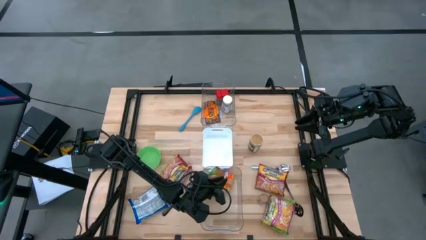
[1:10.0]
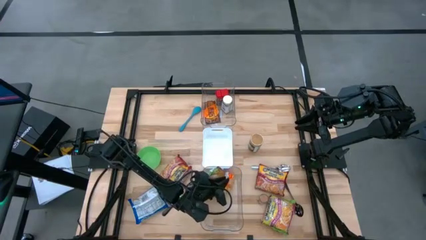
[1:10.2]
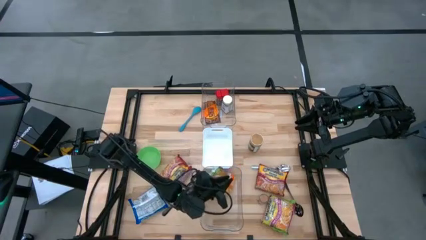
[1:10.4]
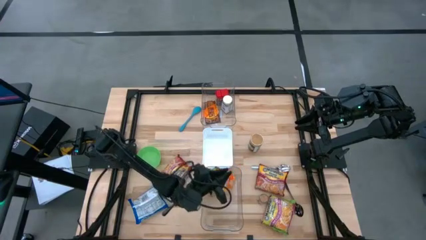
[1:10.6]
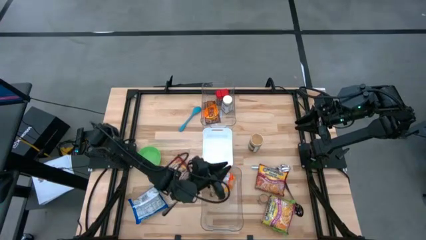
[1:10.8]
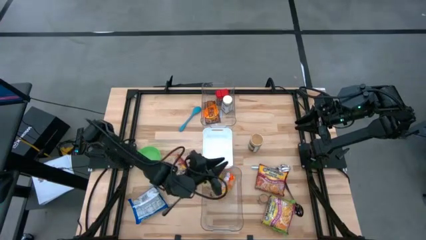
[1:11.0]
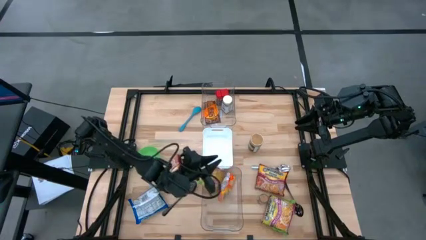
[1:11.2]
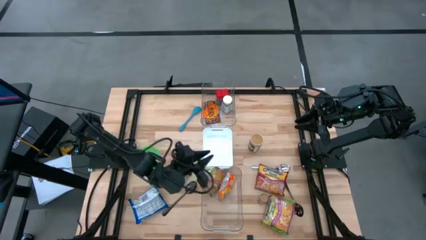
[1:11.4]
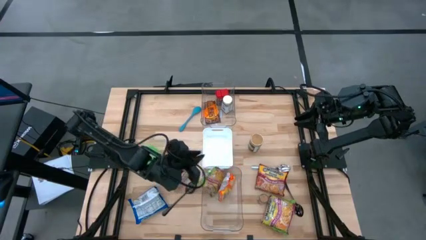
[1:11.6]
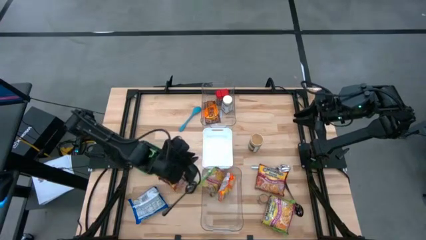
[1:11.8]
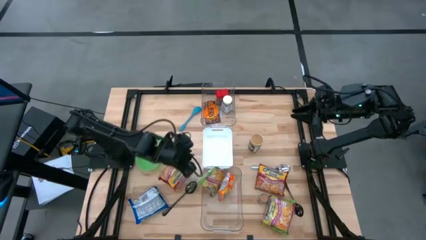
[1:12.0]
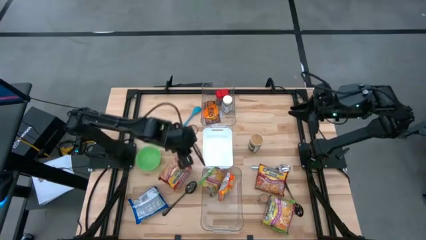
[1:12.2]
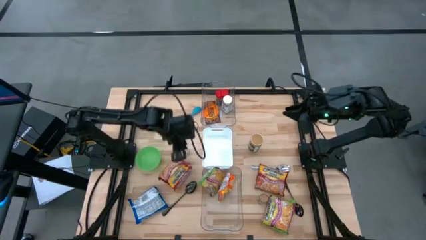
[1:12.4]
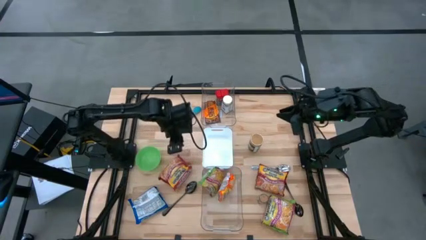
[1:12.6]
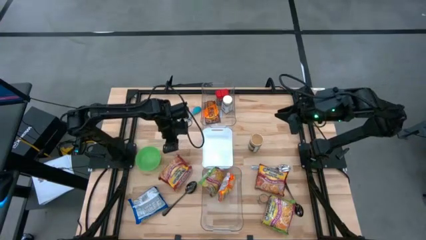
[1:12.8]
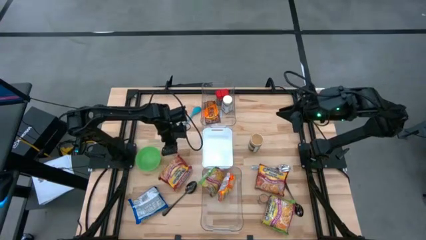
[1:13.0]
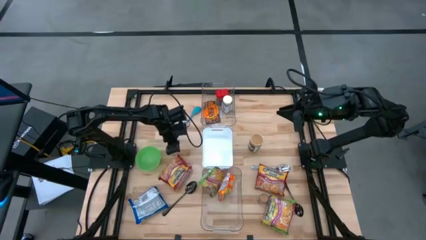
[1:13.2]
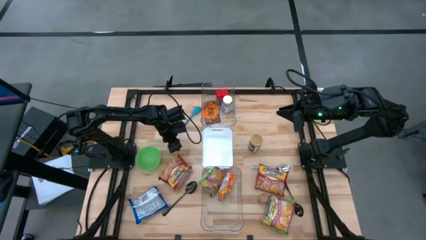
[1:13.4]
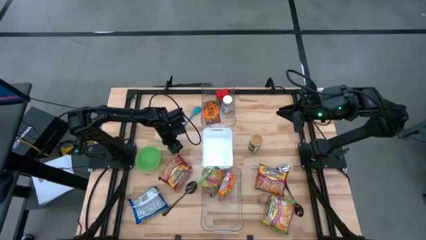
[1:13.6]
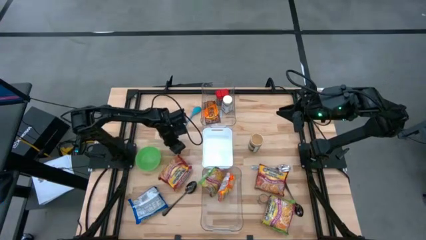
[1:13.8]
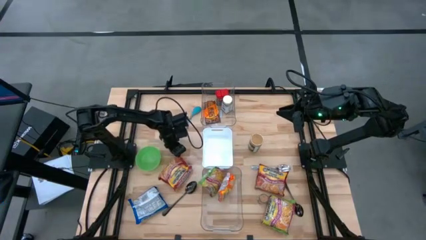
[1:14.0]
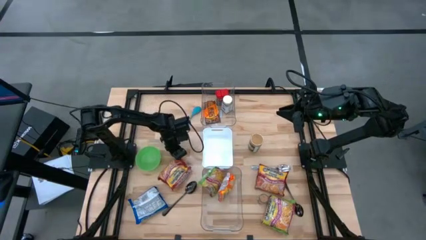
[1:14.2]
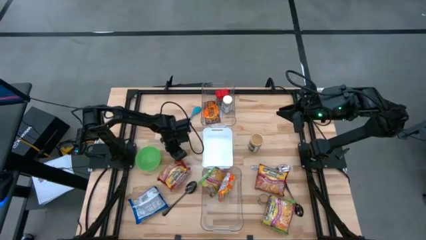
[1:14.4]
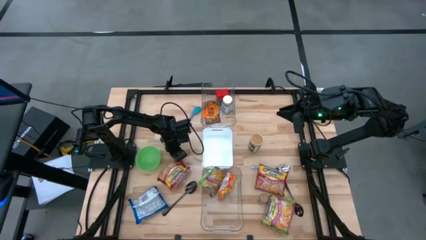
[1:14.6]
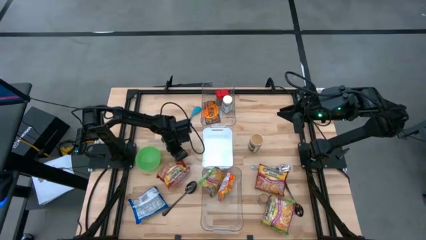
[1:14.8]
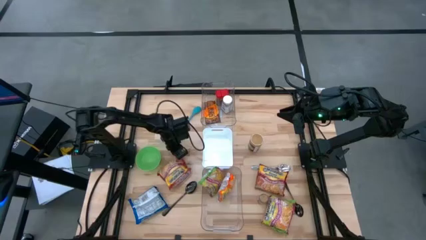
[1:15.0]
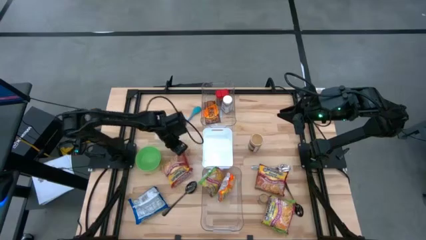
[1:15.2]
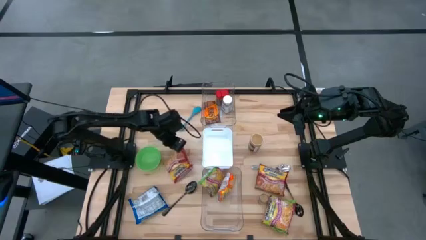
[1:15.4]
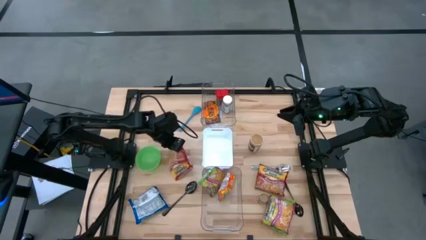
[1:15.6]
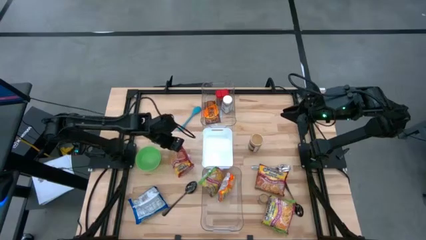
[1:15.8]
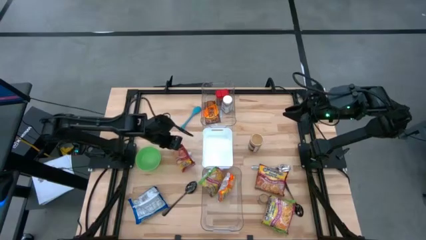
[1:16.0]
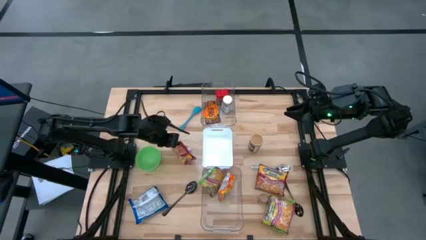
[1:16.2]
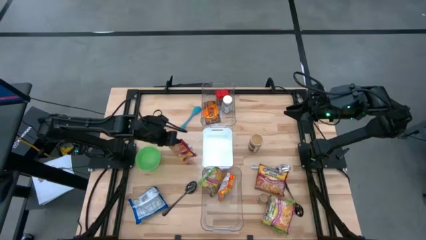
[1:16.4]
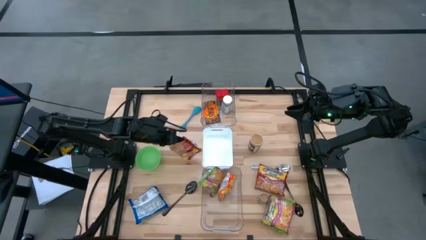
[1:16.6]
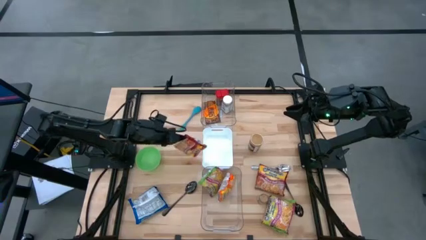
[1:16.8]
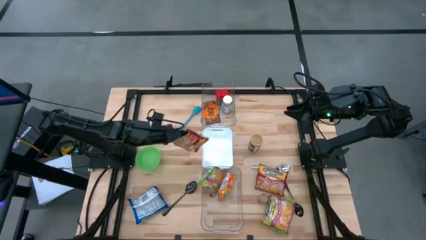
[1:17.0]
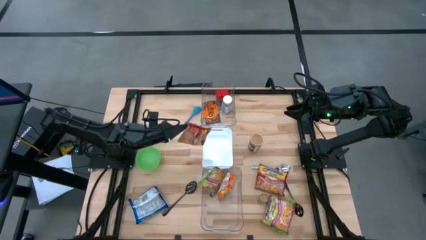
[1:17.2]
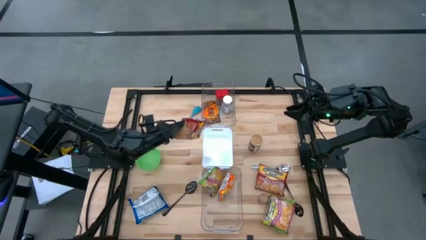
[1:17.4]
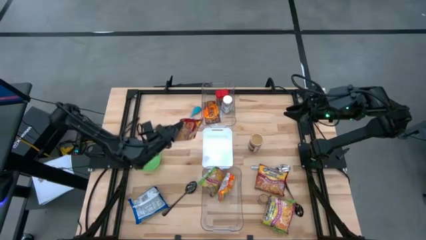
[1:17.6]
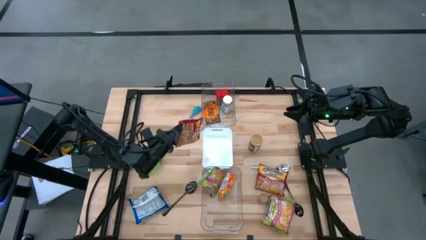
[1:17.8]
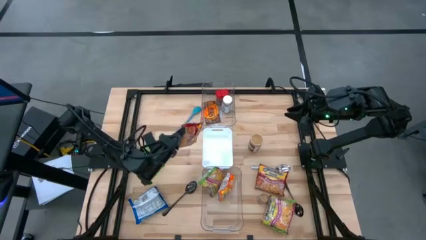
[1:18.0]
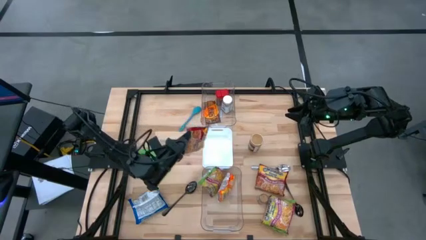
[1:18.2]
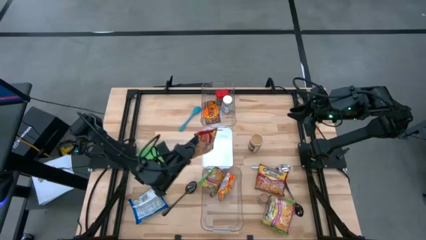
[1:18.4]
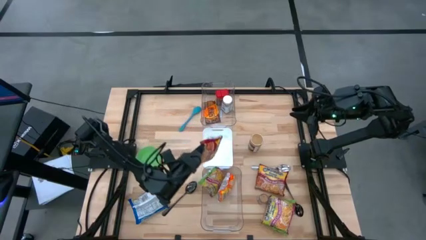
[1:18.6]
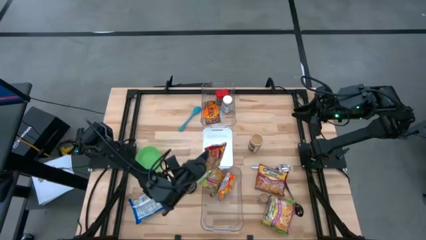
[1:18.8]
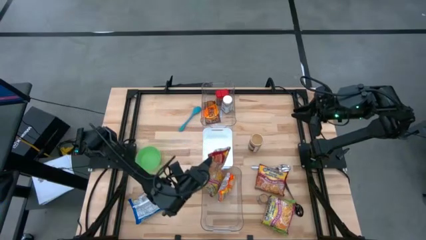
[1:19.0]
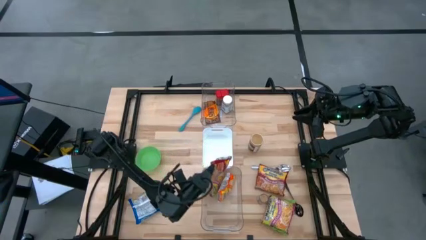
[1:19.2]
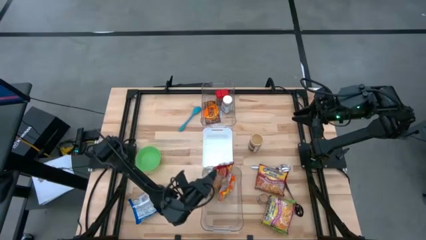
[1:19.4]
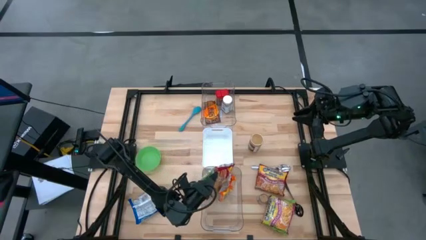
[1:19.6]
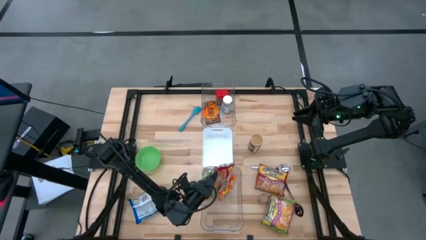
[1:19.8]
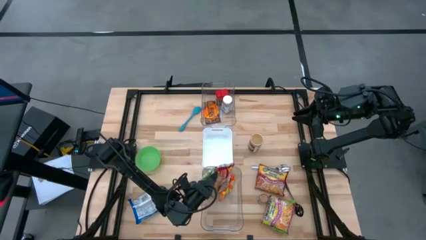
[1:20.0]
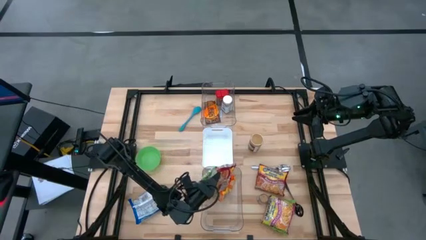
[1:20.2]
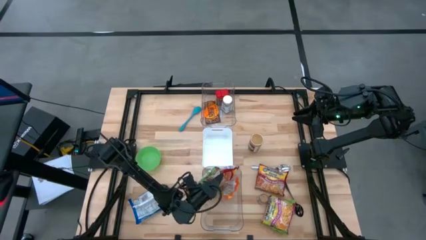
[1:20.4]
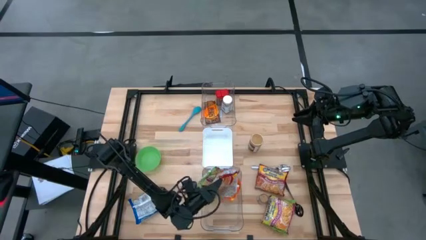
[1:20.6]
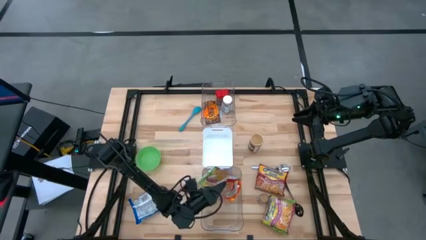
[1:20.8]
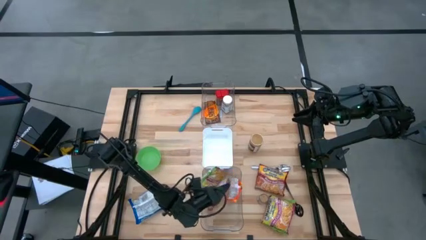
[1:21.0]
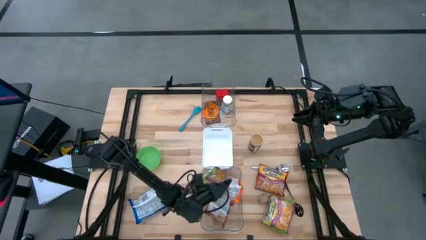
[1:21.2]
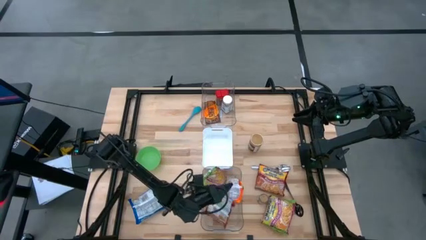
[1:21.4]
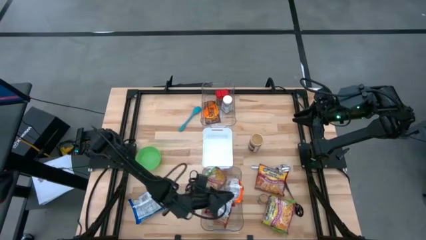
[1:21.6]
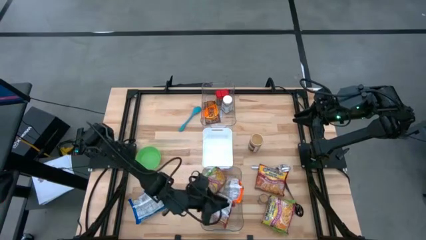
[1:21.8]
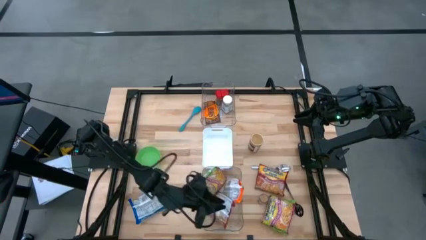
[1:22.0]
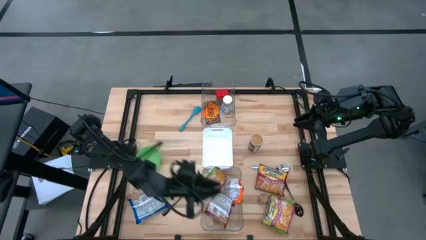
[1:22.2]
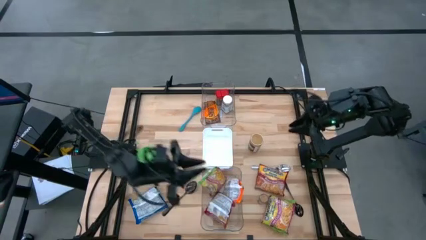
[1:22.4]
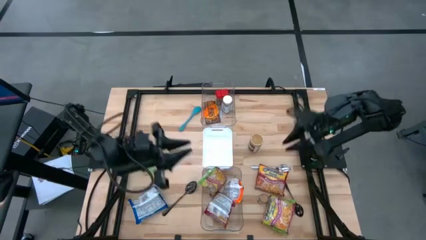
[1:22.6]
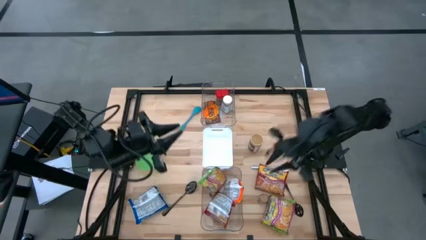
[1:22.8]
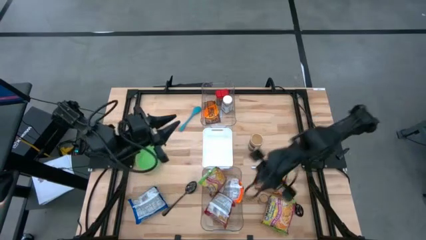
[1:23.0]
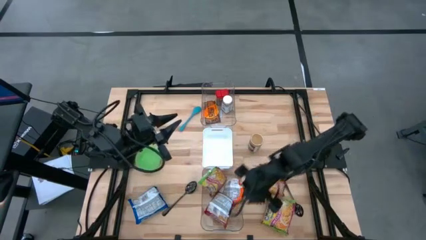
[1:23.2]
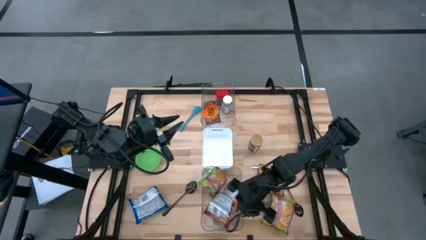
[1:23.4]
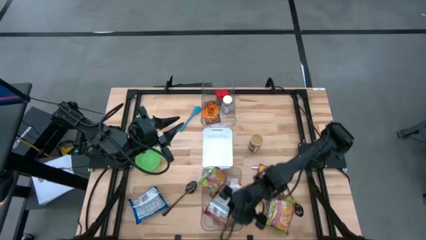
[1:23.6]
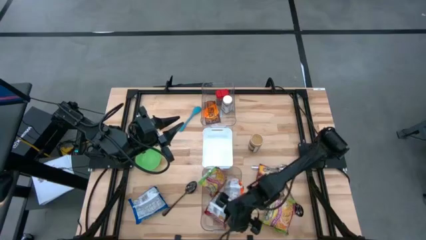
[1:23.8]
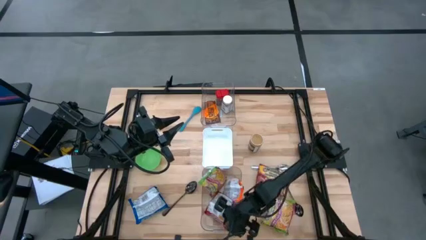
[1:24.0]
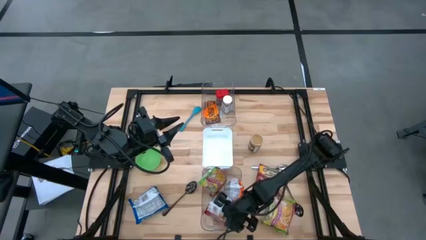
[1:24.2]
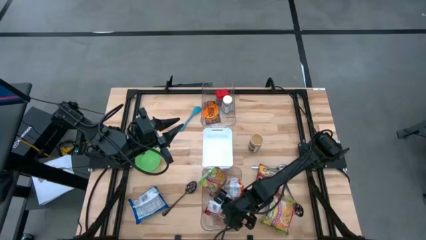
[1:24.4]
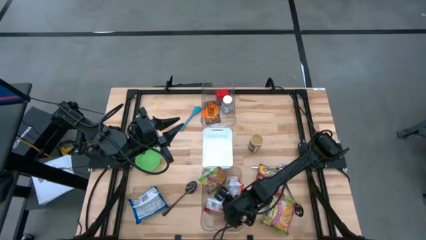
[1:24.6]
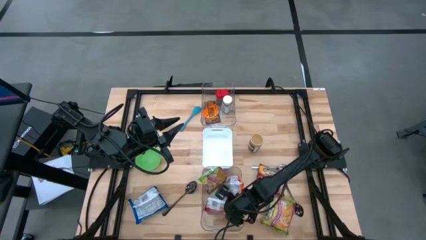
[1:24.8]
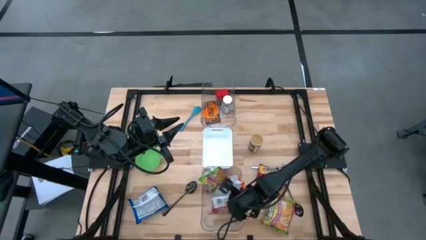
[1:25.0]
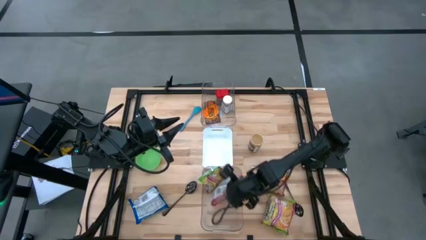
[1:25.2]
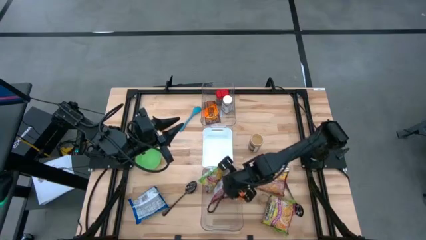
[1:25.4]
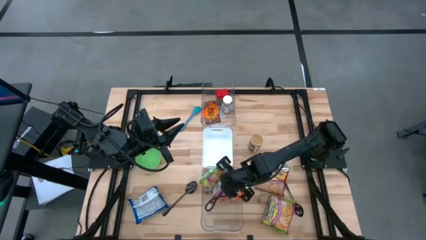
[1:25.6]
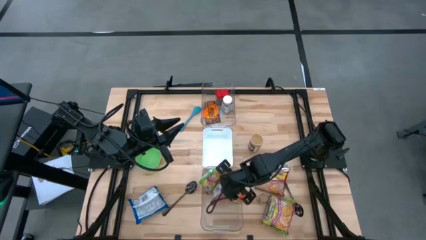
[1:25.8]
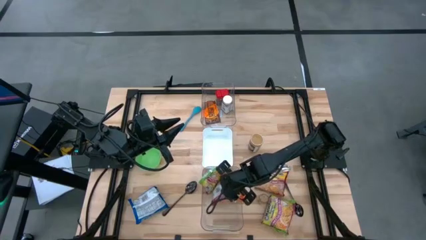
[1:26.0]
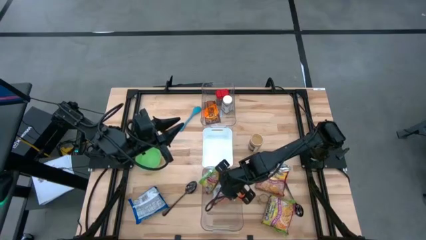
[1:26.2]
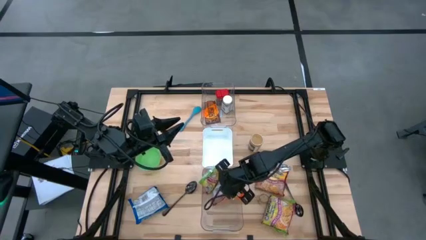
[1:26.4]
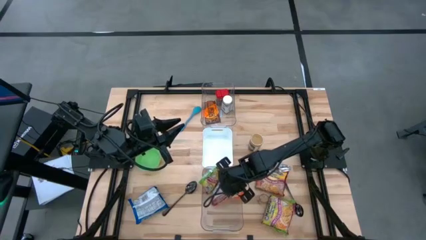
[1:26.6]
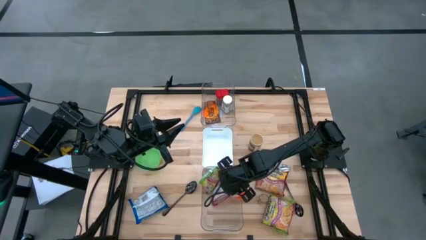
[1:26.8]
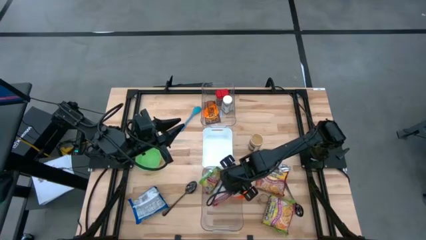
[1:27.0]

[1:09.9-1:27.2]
Task: Pick & Place Food Item
Put the left red noodle pack into the bottom transparent bin
